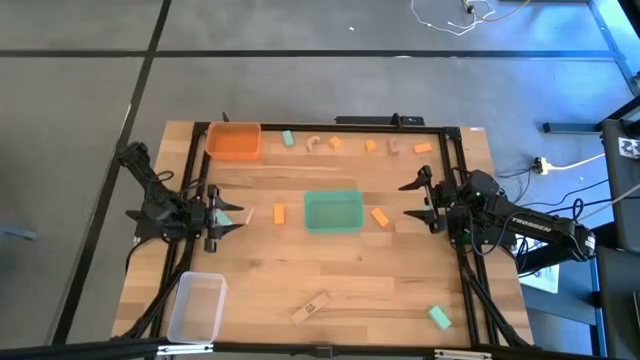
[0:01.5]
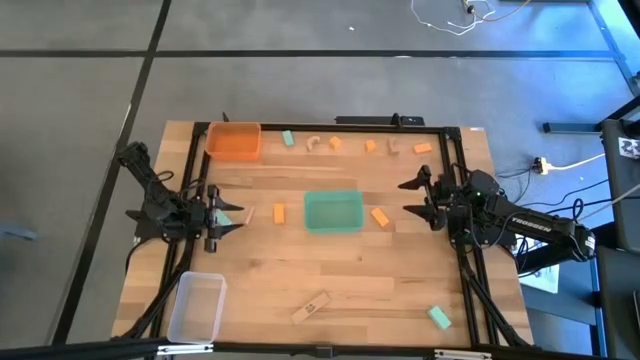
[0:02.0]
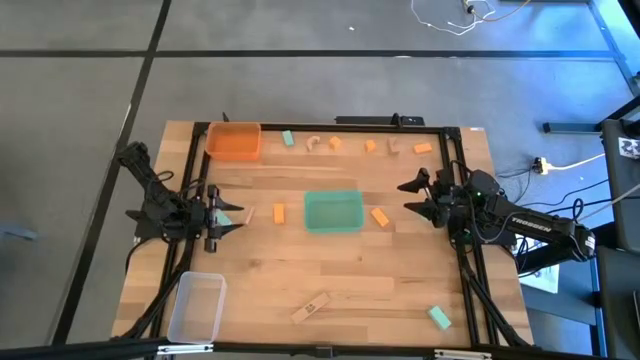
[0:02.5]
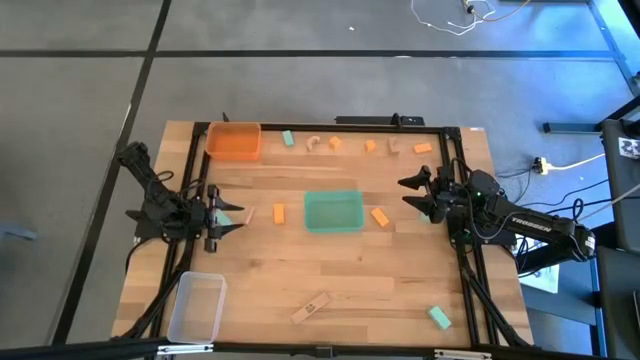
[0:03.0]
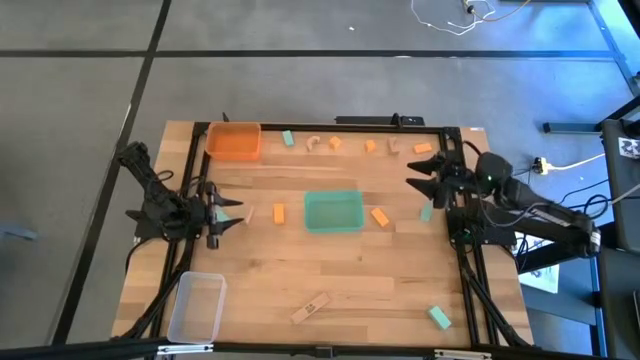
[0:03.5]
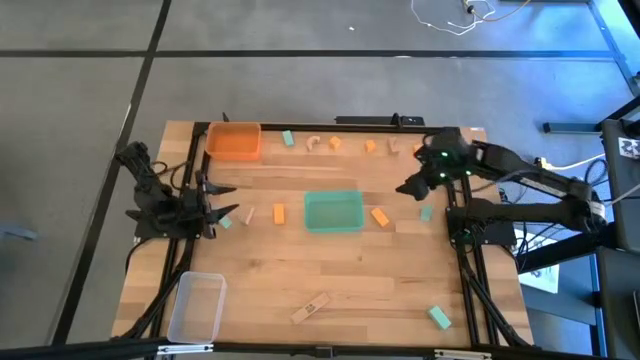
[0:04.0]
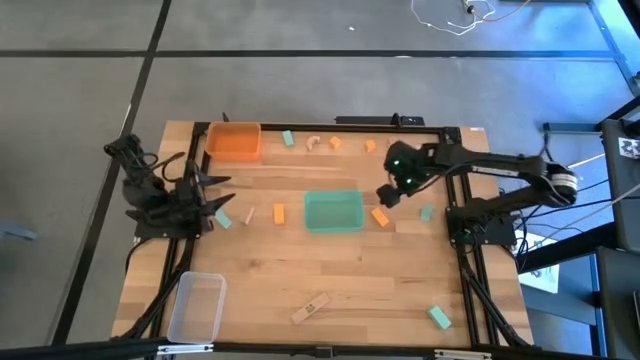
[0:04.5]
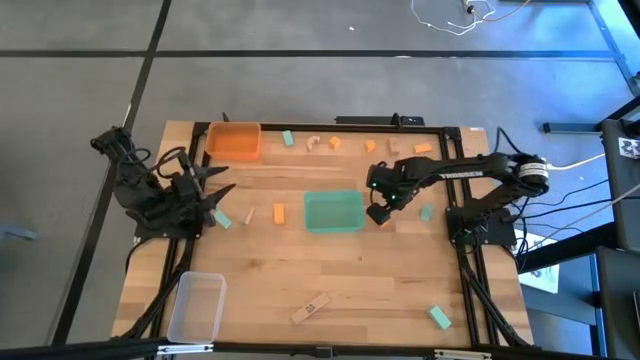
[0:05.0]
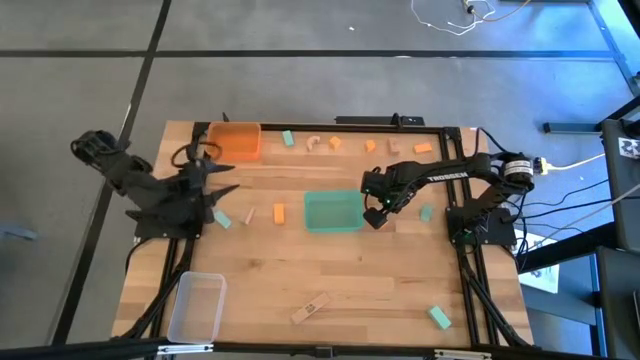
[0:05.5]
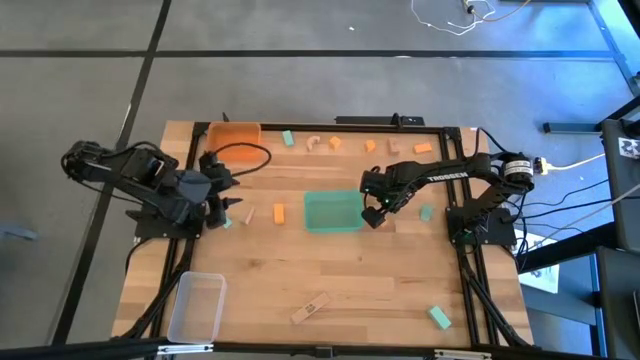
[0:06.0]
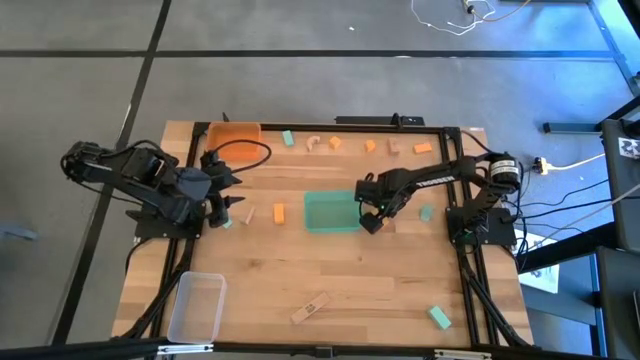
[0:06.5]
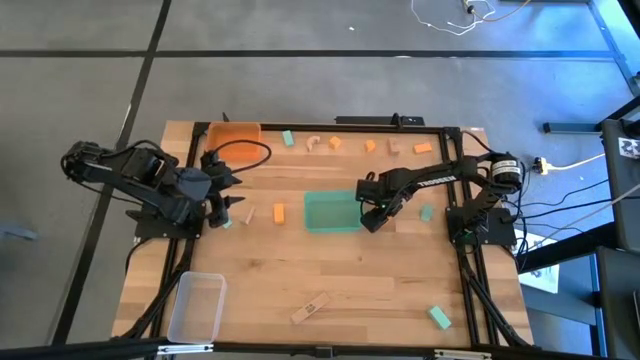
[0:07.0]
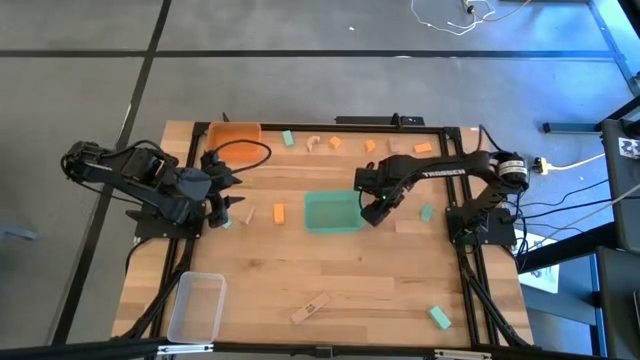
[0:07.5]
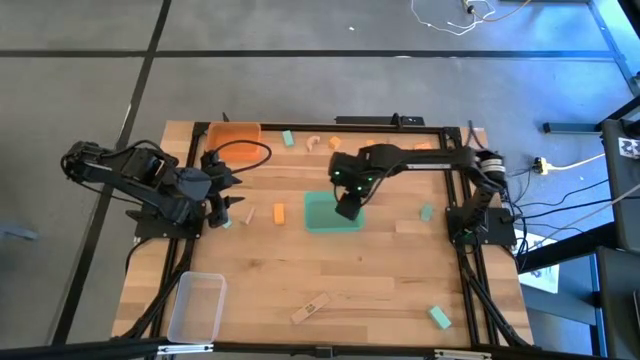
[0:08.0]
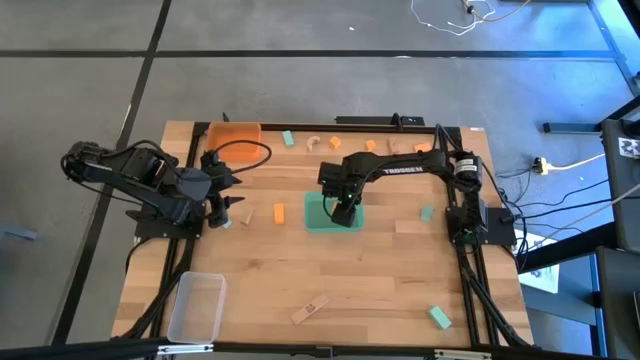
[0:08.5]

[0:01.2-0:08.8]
Task: Sort & place blocks by color
Put the orange block into the light blue bin

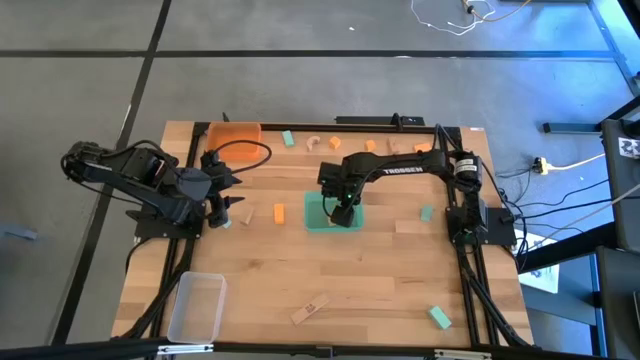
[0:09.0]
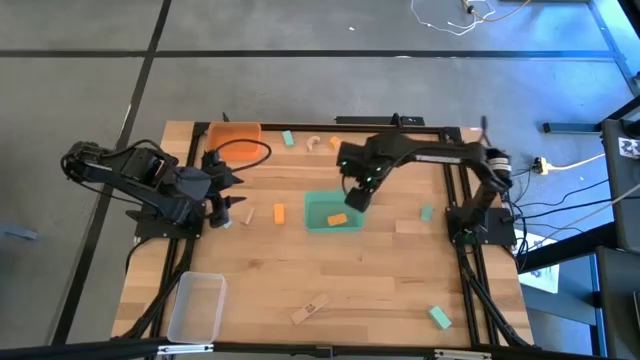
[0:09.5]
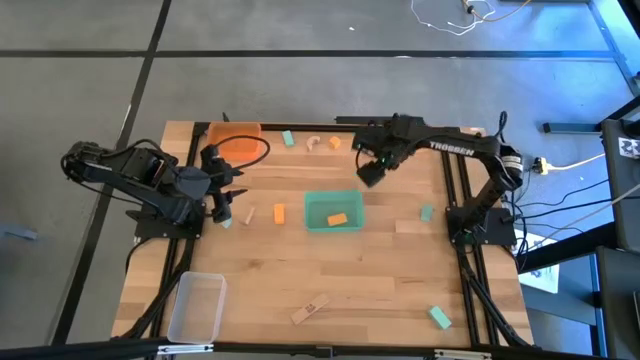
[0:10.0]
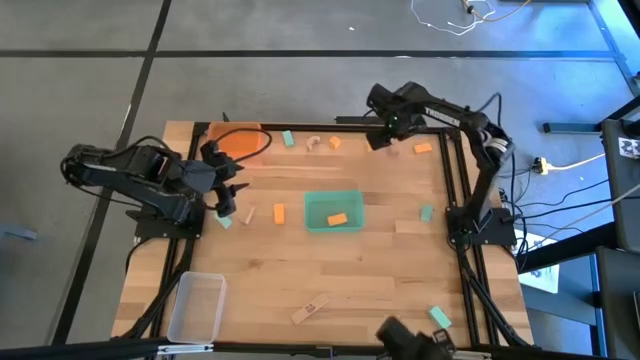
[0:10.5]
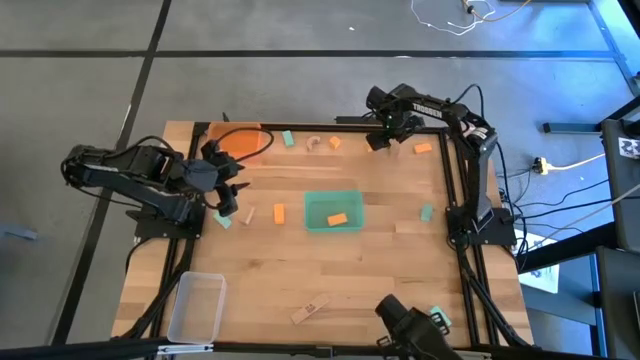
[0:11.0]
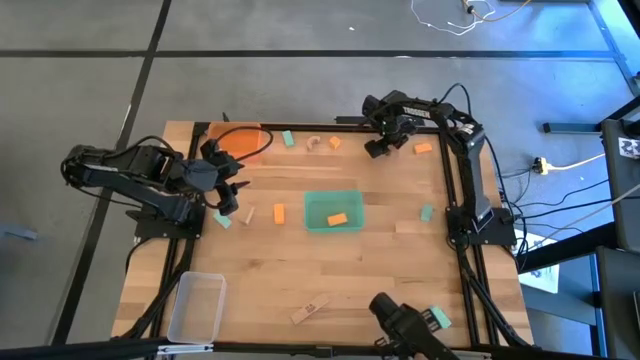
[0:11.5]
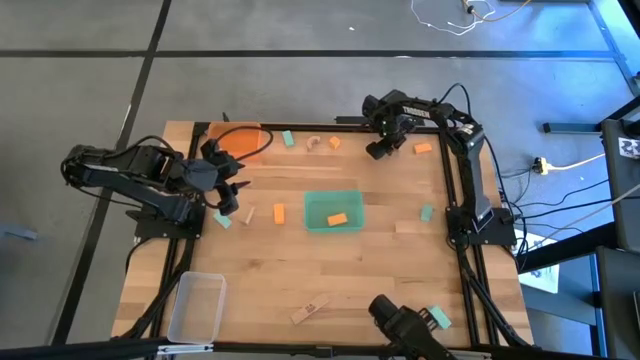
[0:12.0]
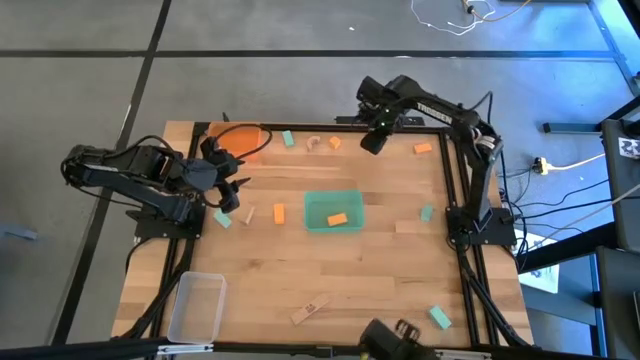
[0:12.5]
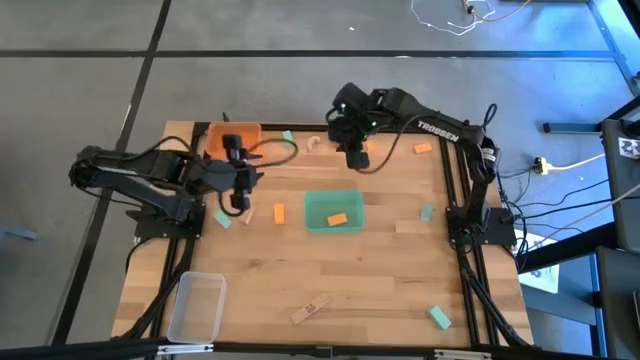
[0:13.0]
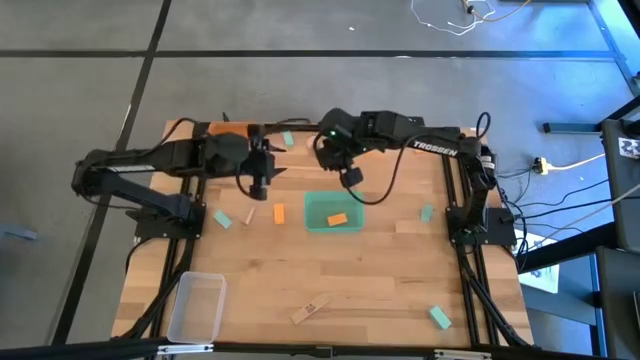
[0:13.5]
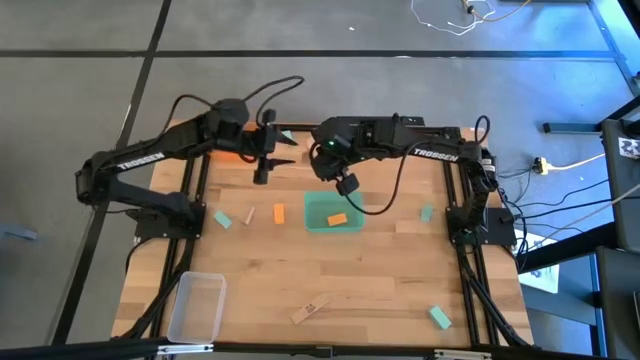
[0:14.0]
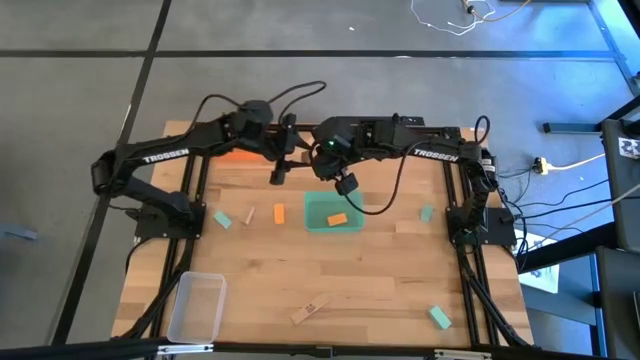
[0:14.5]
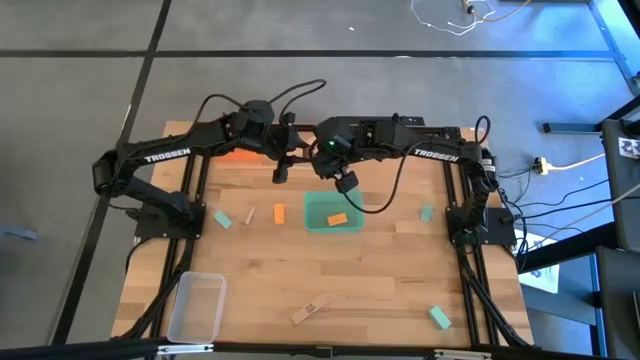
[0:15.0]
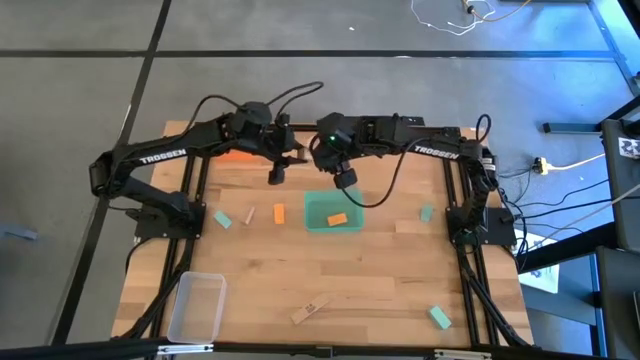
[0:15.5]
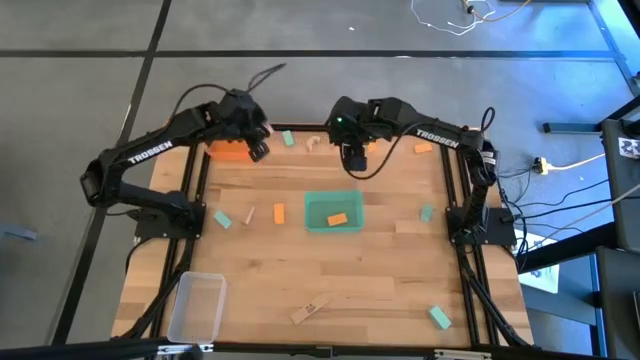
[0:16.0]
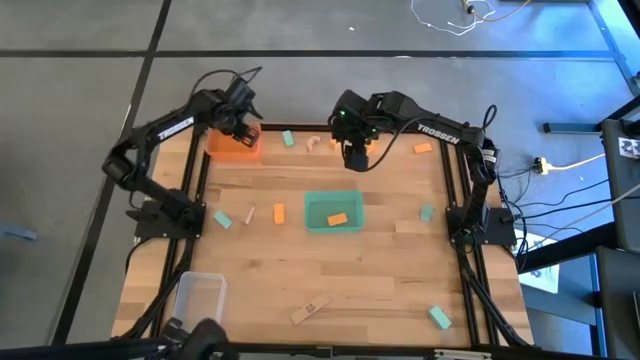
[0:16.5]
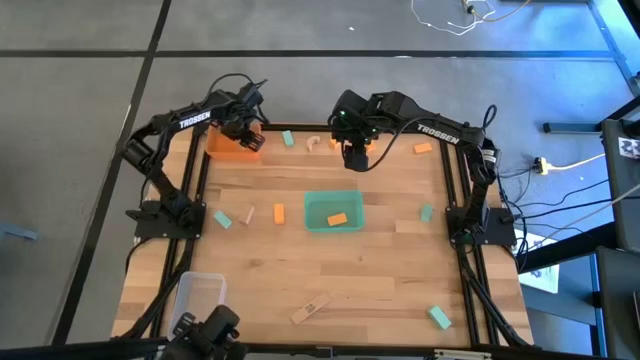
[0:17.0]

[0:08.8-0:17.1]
Put the brown block into the light orange bin

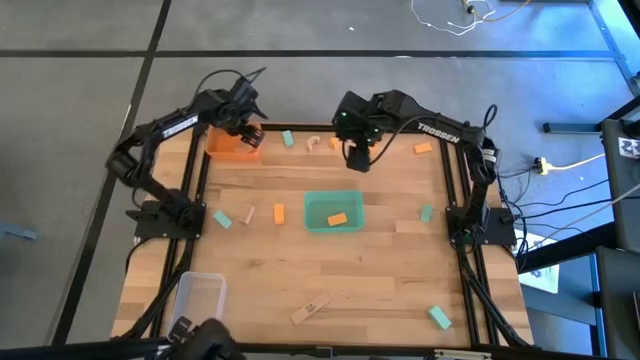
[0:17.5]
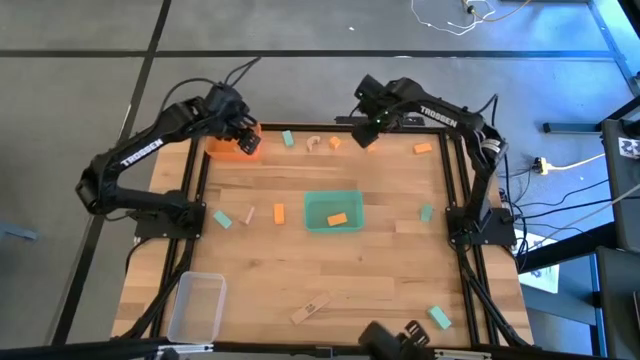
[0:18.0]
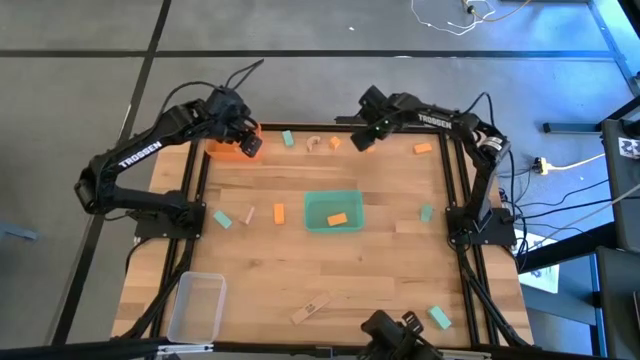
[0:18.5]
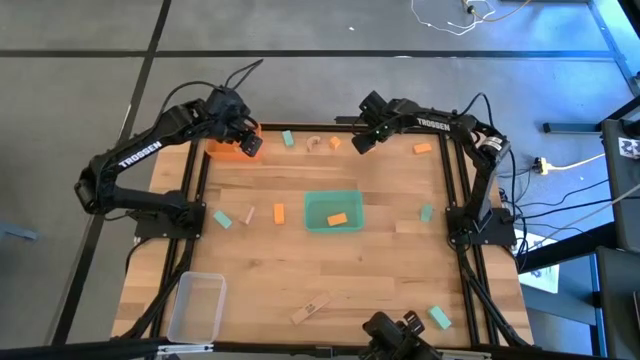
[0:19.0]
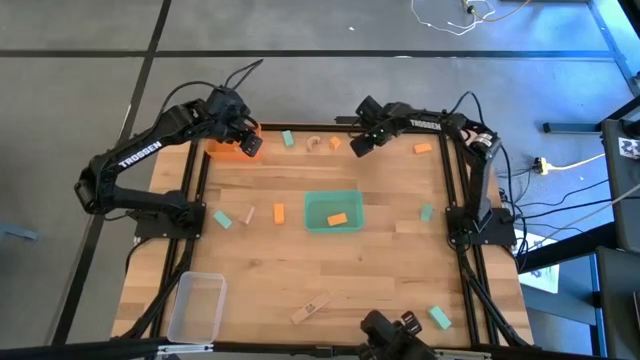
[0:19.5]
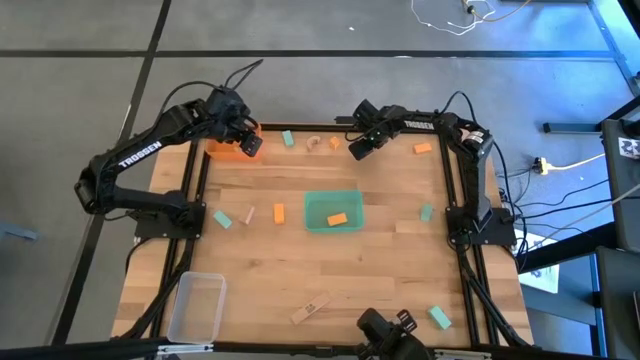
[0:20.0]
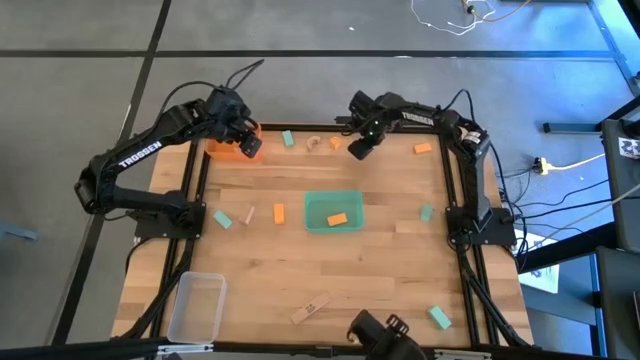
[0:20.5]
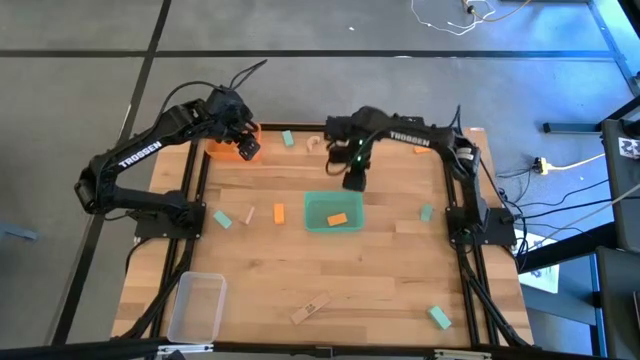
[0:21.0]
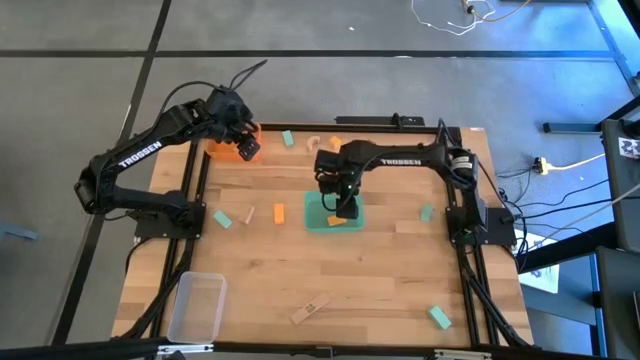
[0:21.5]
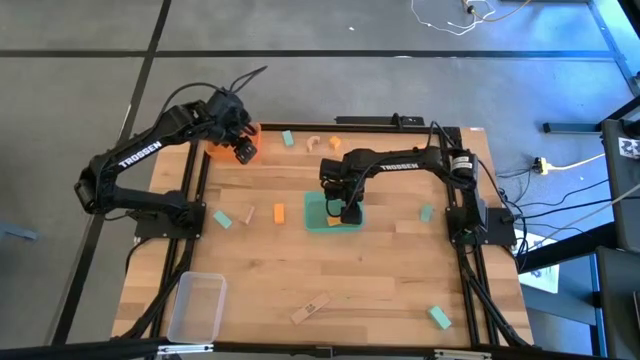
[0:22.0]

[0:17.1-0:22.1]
Put the orange block into the light blue bin

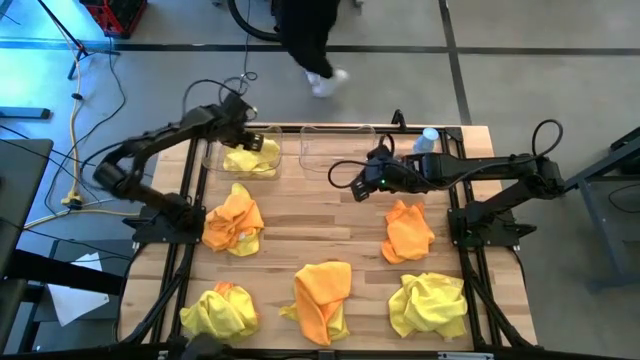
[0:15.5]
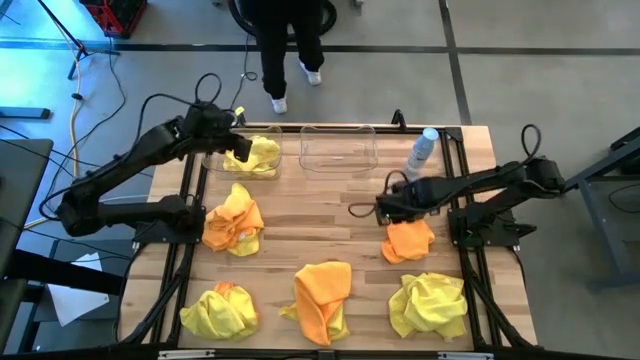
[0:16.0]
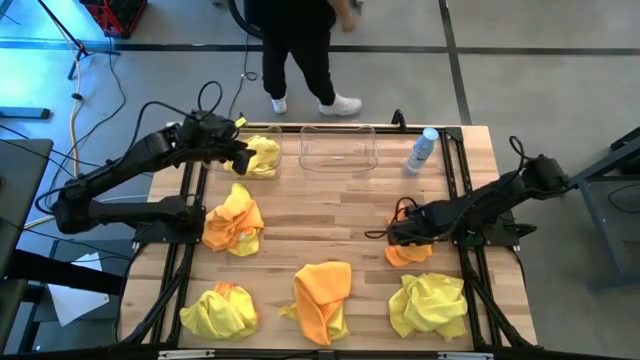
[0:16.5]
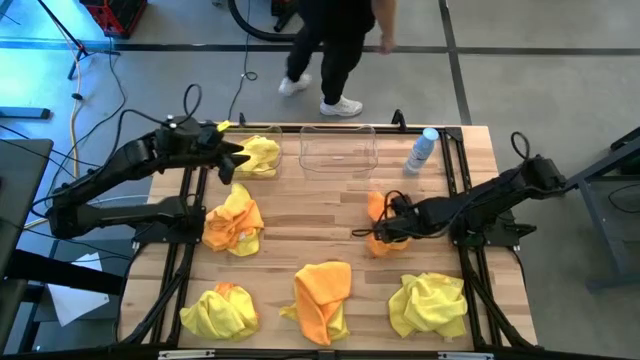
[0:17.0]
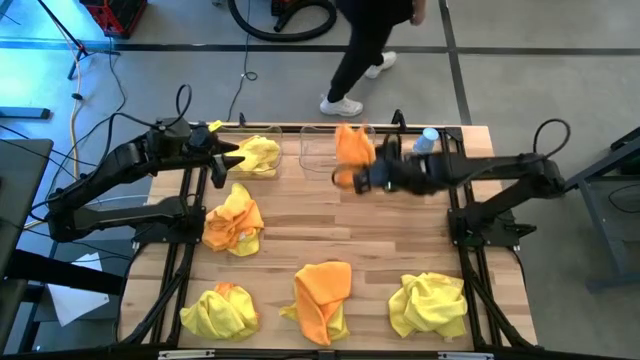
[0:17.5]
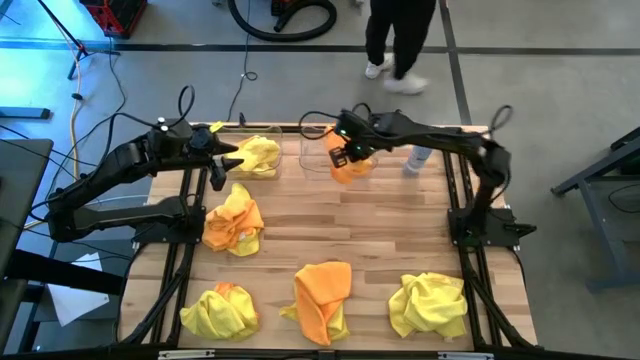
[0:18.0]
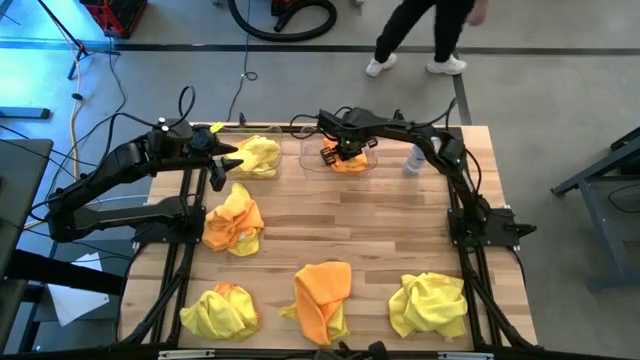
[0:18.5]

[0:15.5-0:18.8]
Task: Sort microfiber towel by color & place in baskets
Put the orange microfiber towel into the right transparent bin
